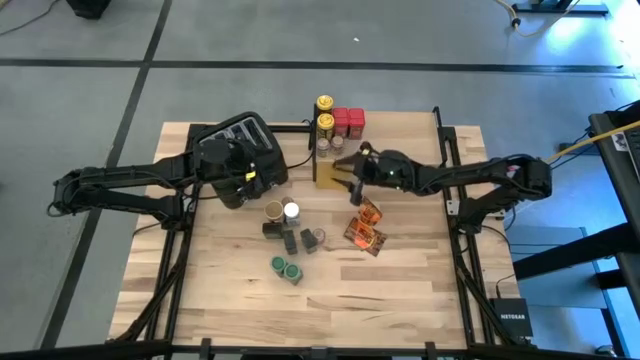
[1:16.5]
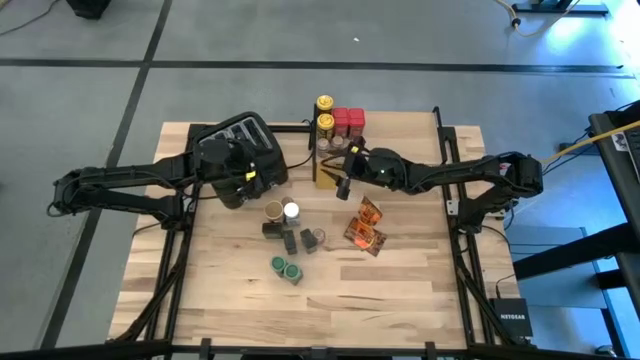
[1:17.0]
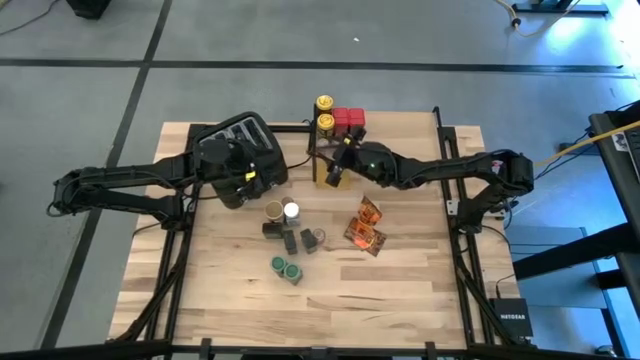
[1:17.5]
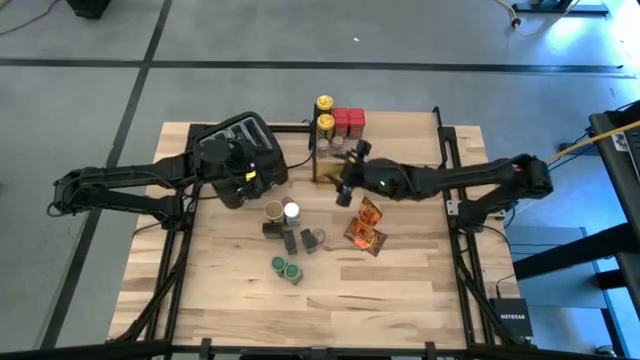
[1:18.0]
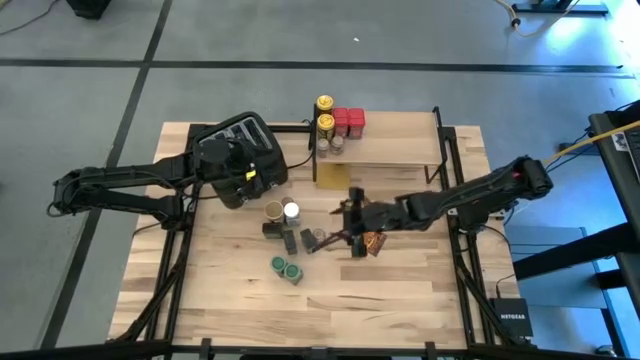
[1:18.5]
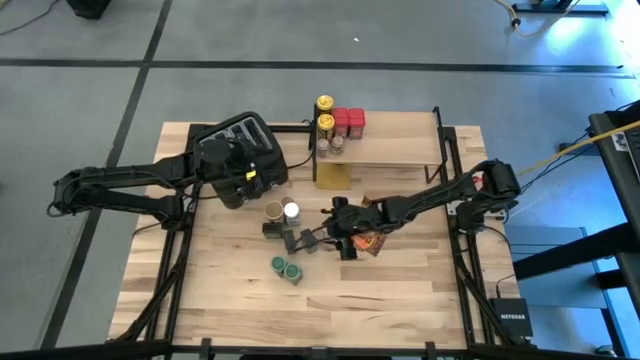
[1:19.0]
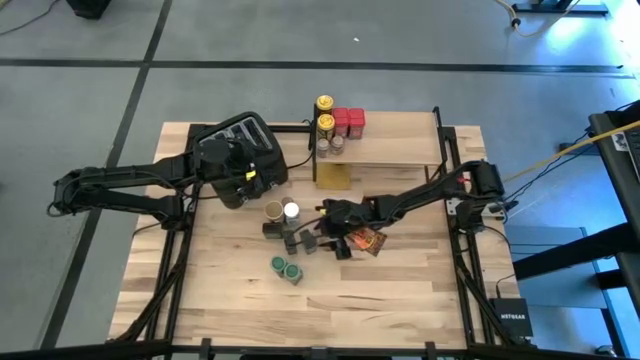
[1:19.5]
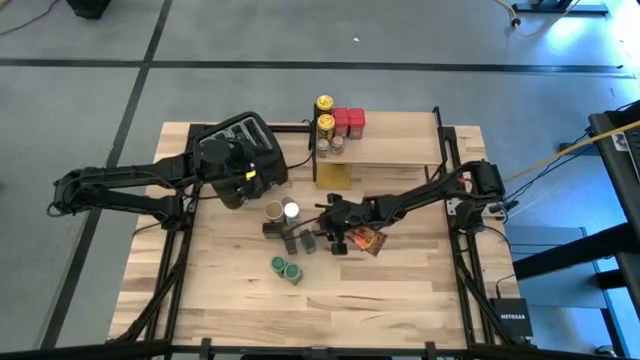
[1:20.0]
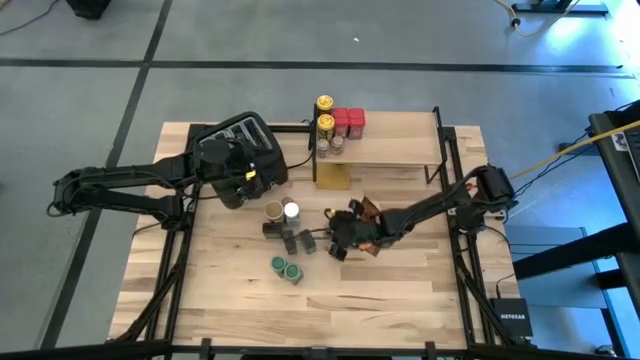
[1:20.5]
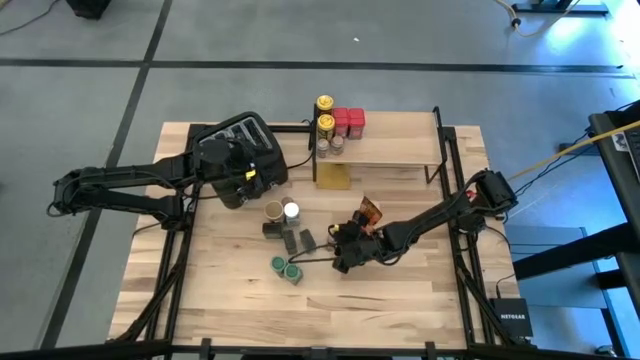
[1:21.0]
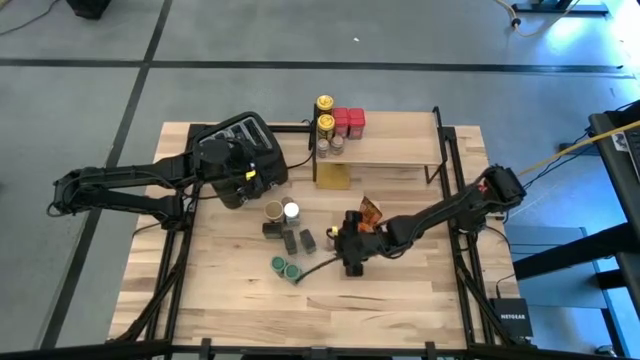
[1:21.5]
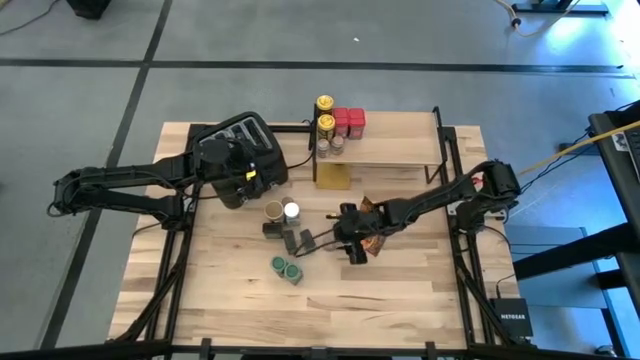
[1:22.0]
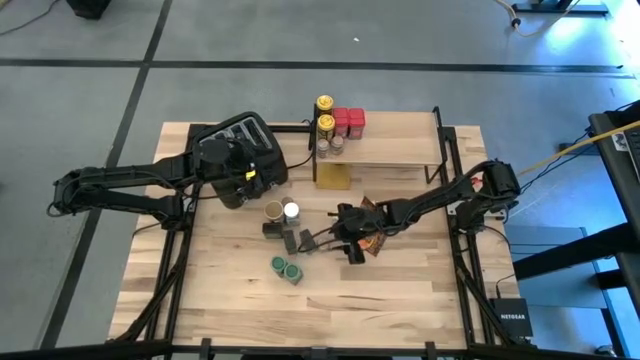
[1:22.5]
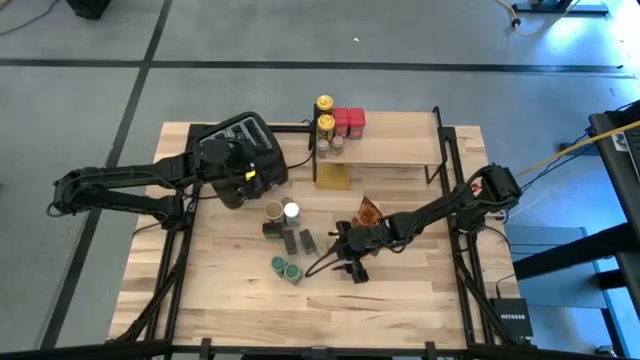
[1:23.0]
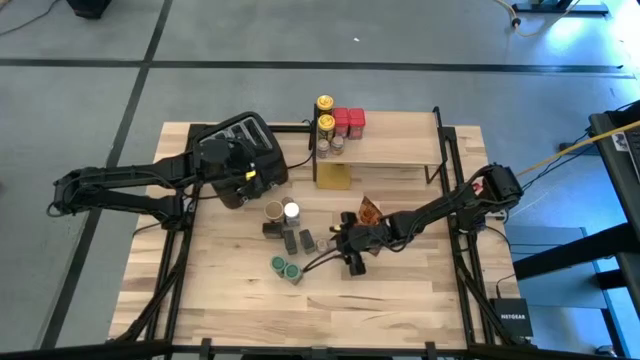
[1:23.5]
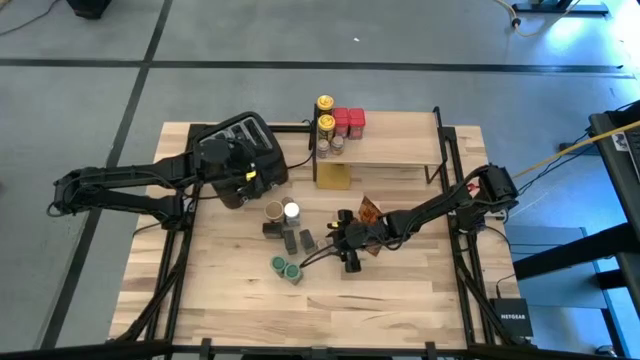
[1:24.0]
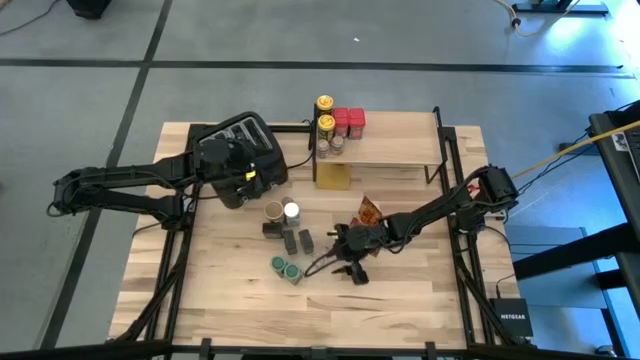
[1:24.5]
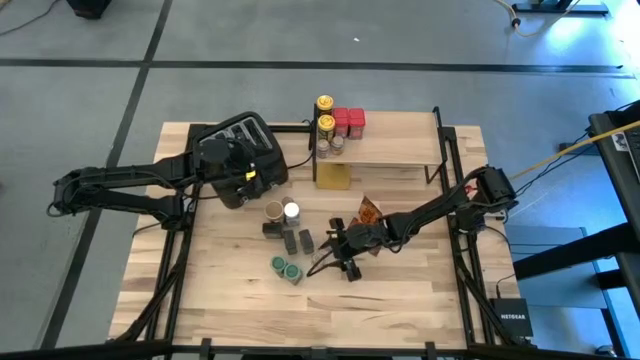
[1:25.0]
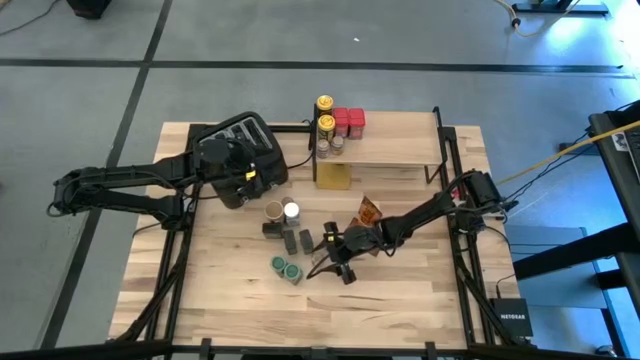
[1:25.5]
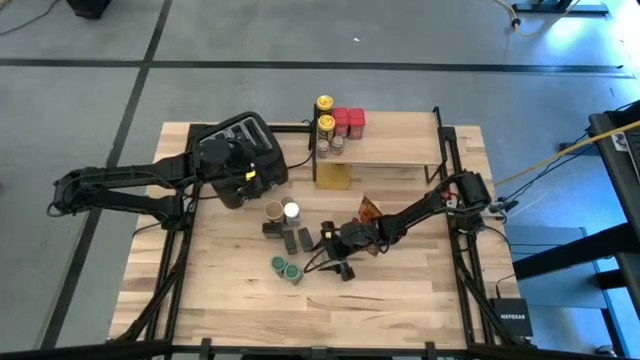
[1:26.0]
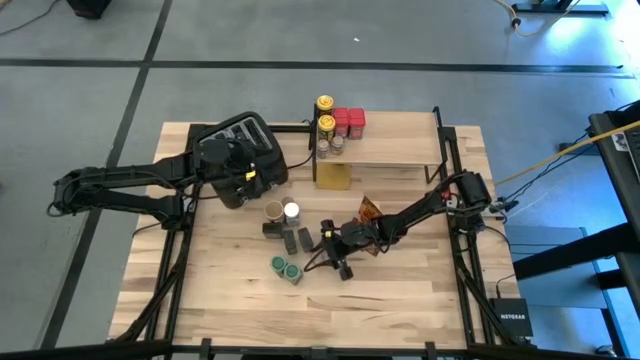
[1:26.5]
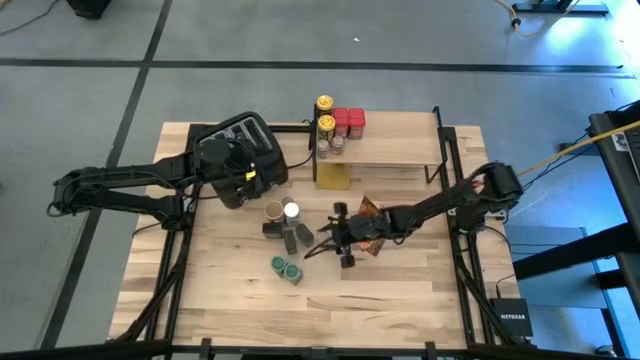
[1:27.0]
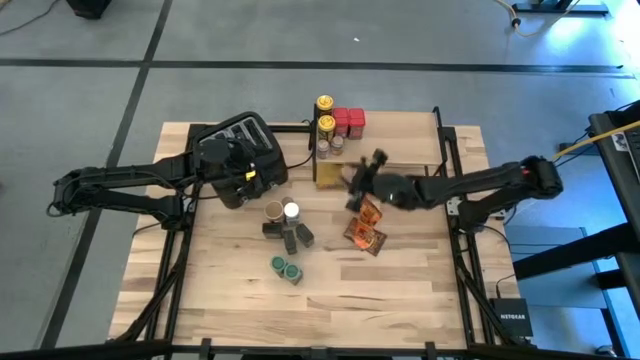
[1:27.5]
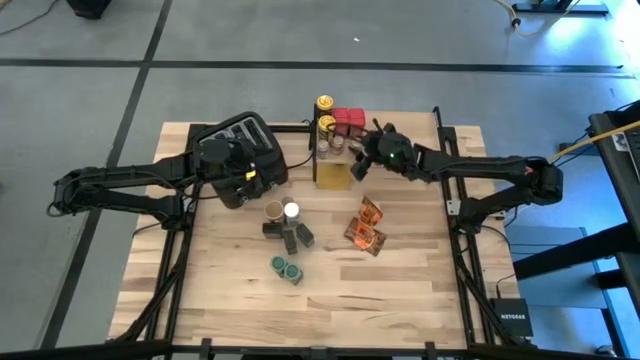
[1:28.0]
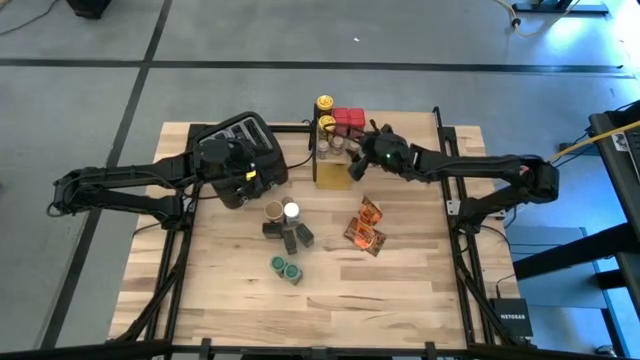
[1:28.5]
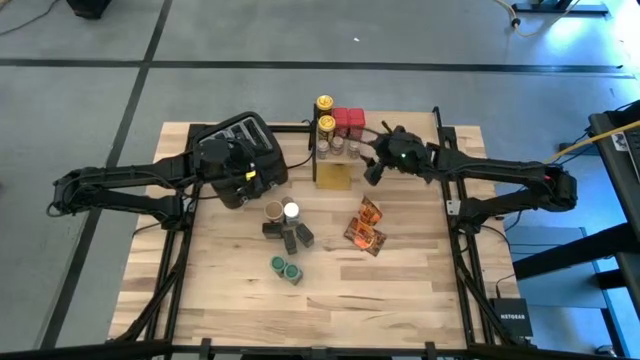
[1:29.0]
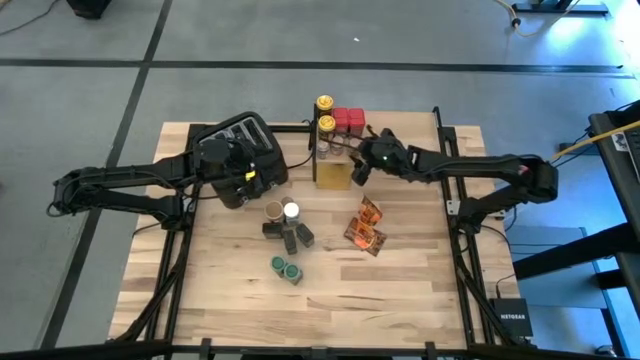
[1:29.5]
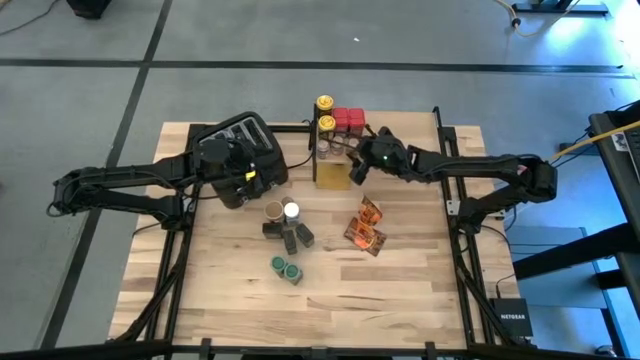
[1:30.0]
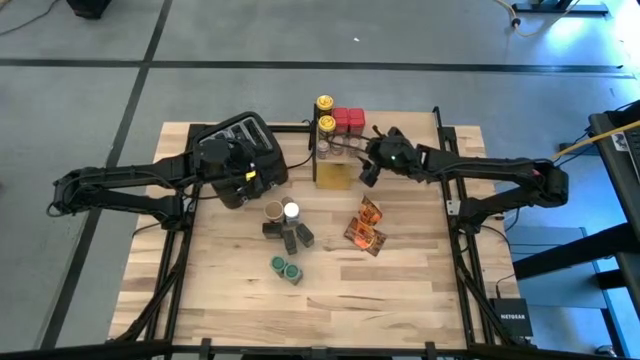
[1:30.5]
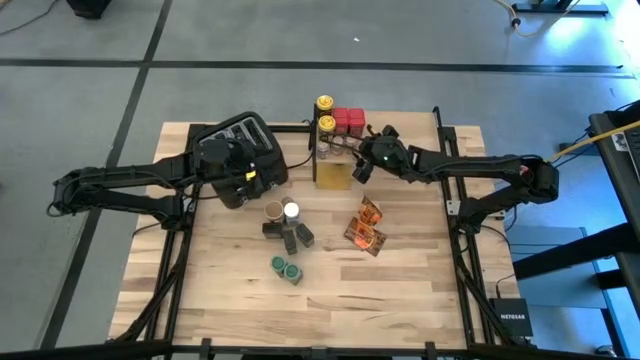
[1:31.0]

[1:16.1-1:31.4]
Task: Shelf spices
Put the brown seasoning bottle on the shelf

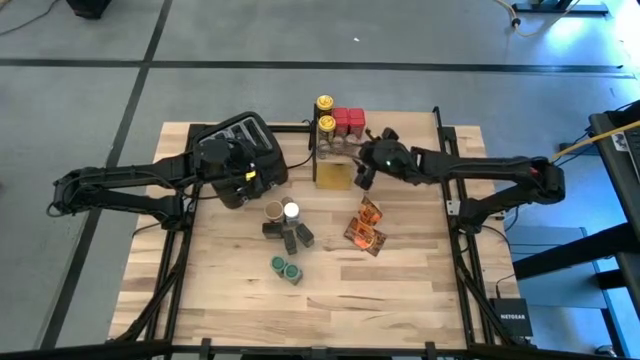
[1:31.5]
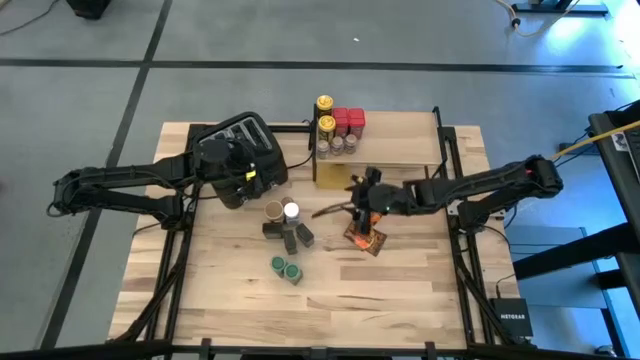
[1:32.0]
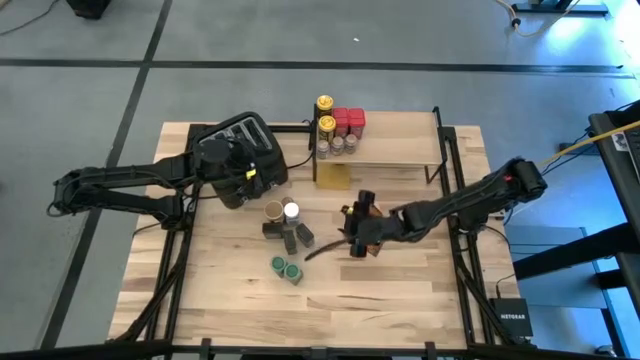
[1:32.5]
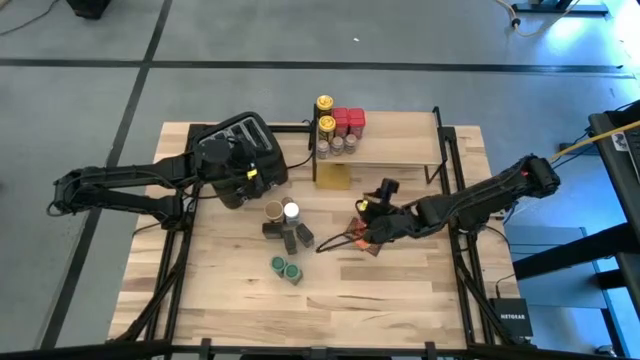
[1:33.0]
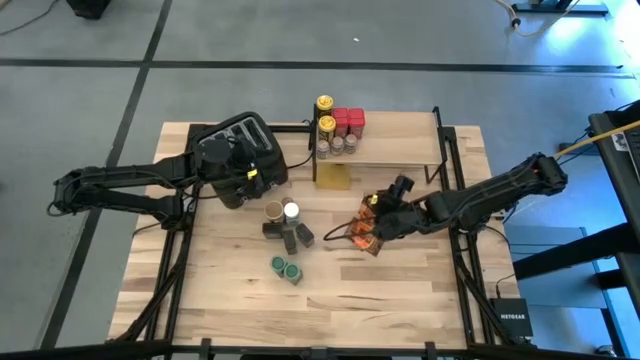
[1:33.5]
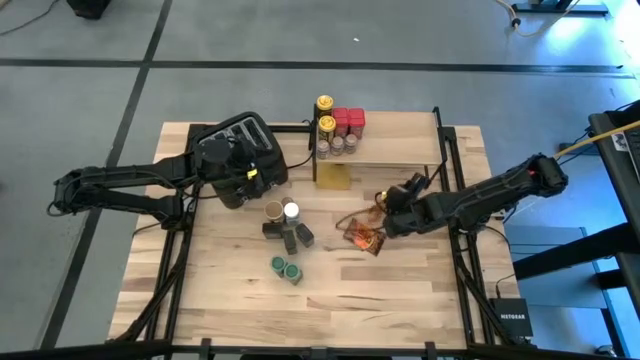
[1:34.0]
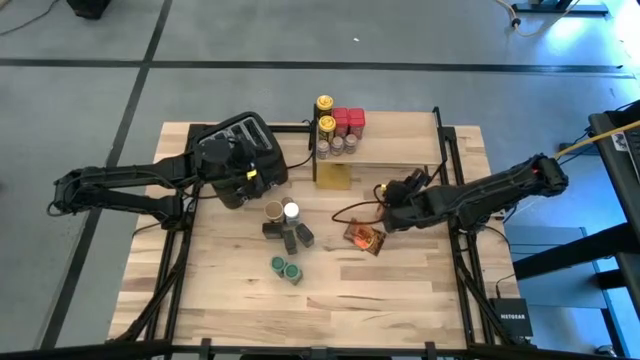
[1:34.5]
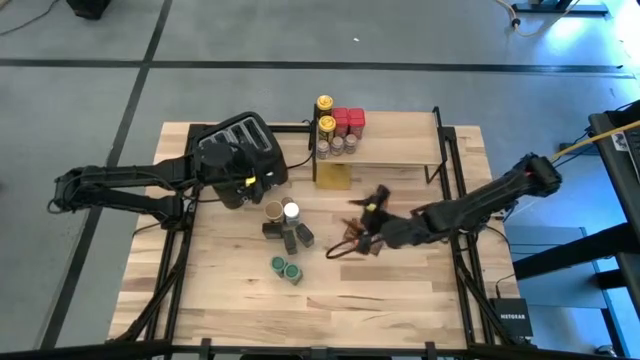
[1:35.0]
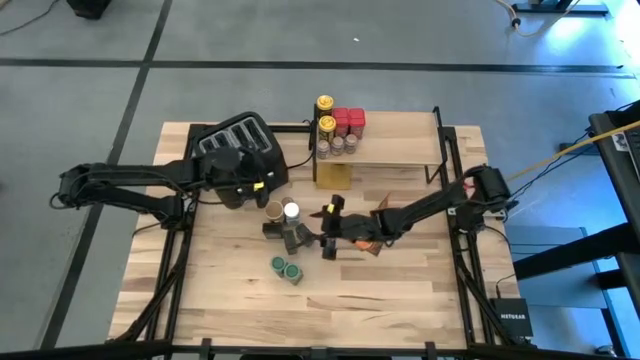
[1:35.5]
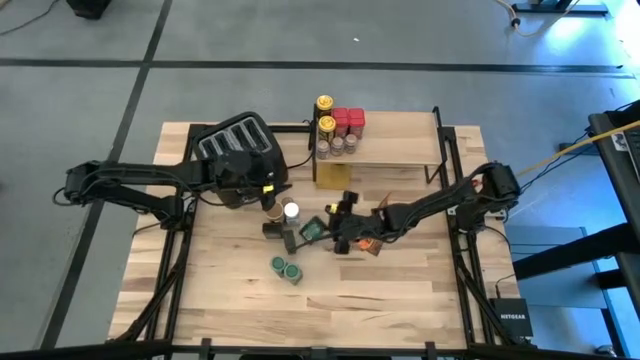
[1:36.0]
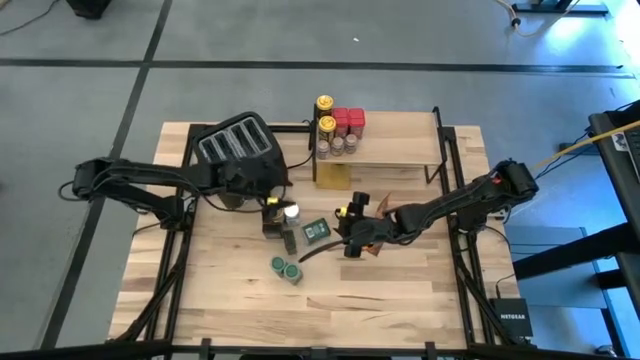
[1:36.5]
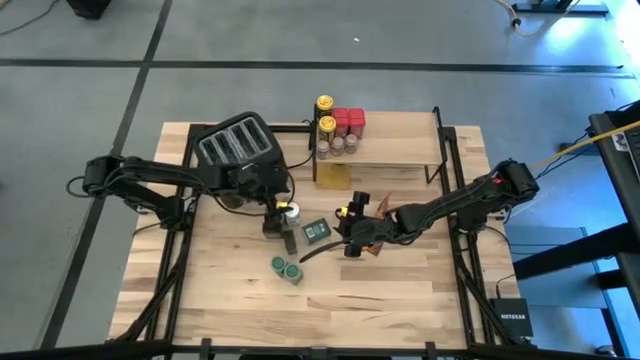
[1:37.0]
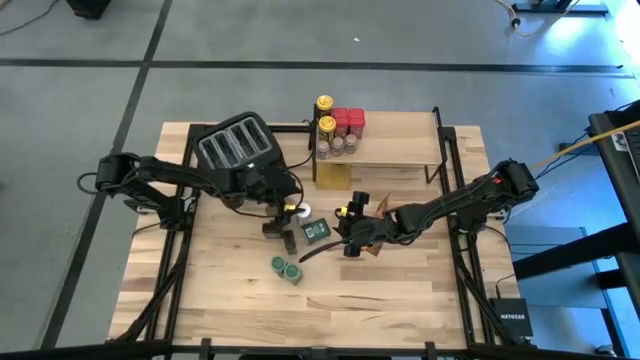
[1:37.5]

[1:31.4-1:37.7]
Adjust the seasoning bottle and can
